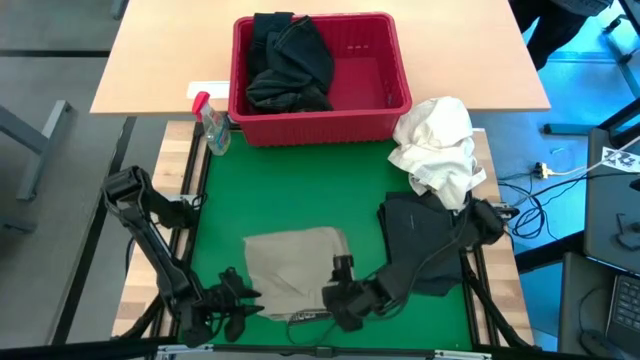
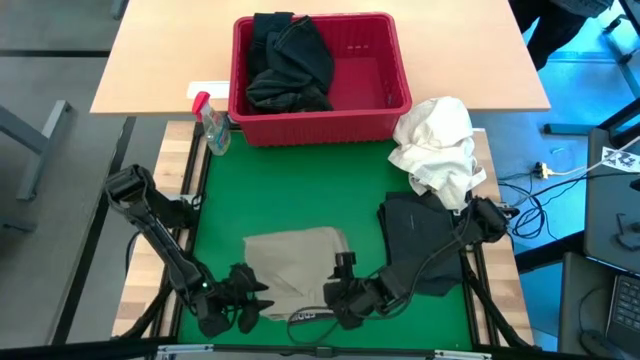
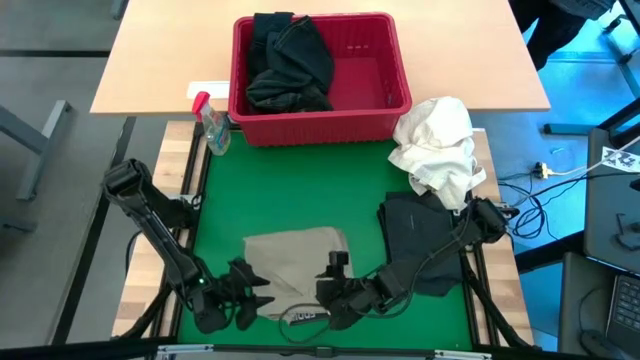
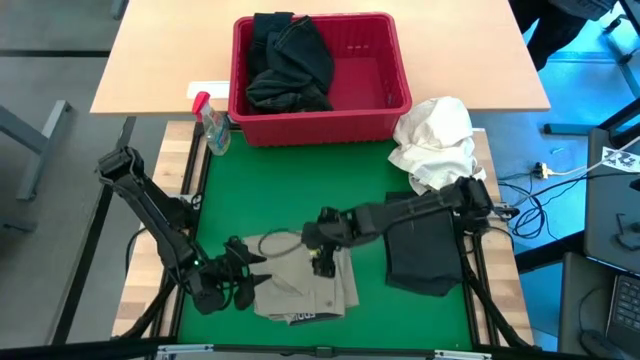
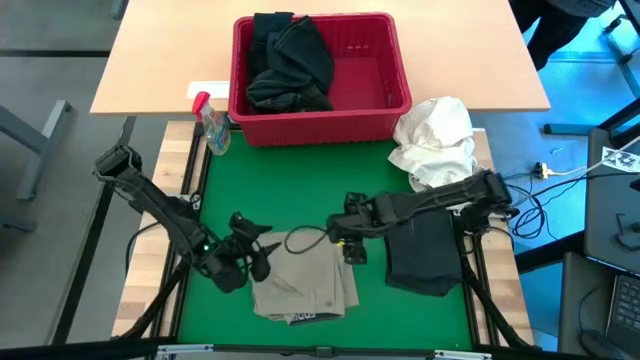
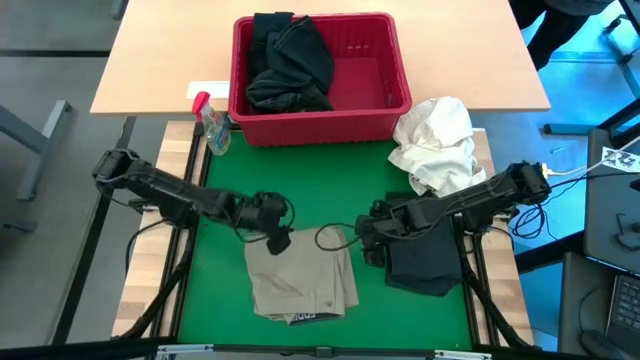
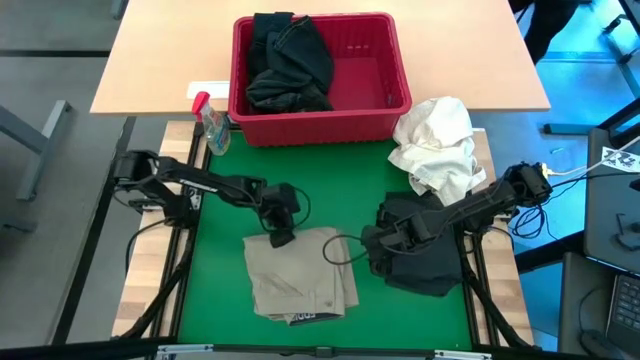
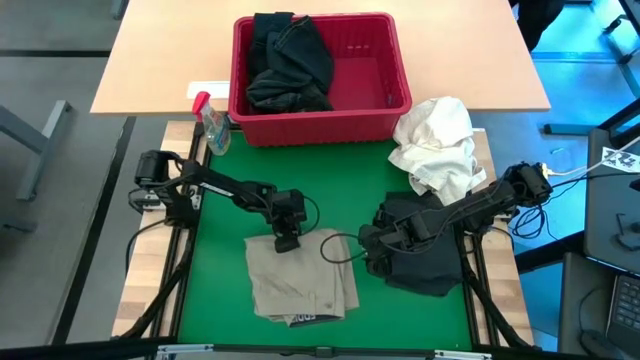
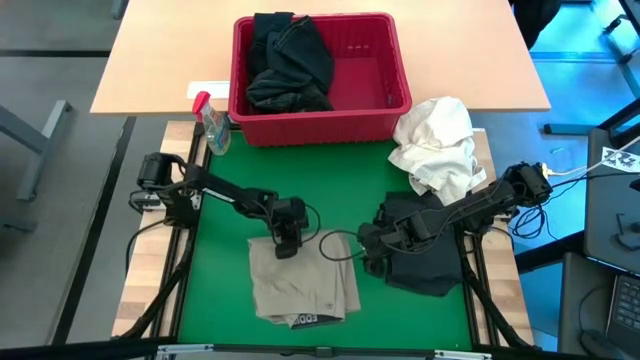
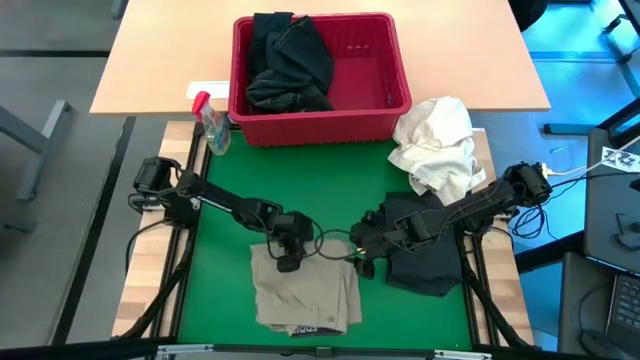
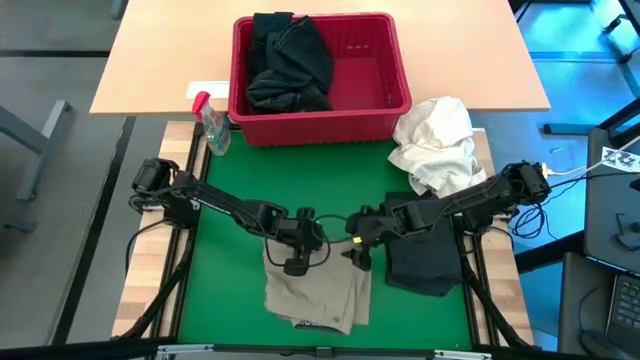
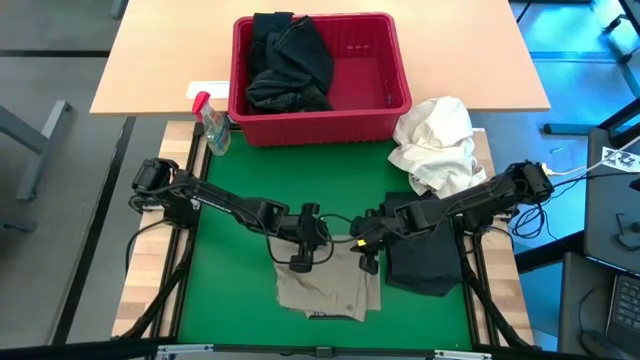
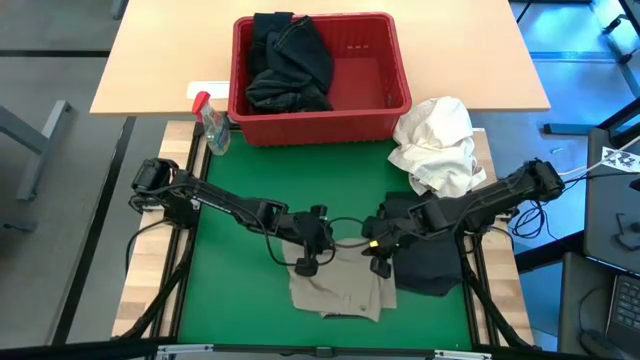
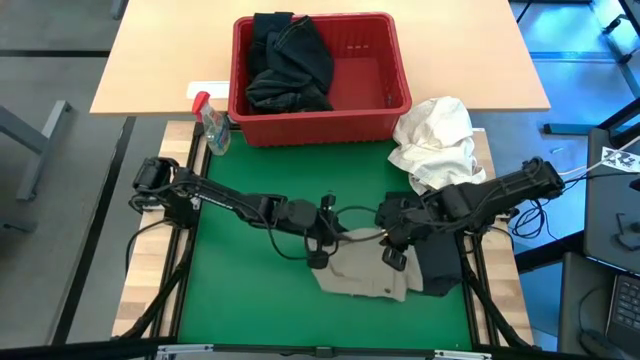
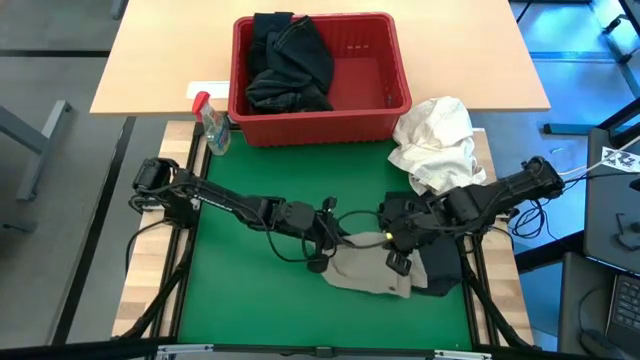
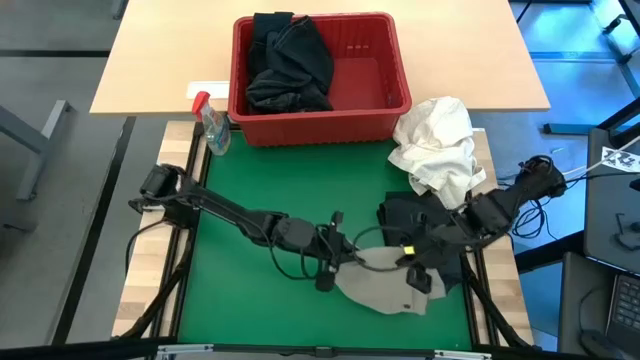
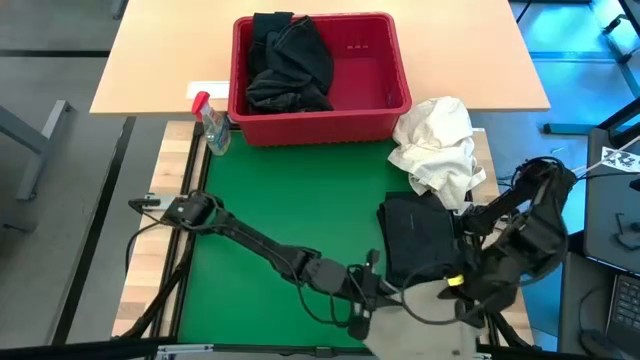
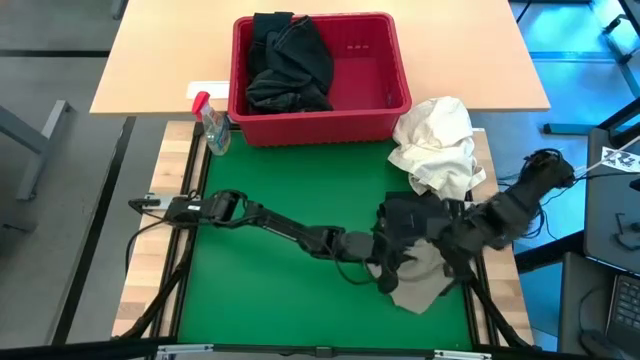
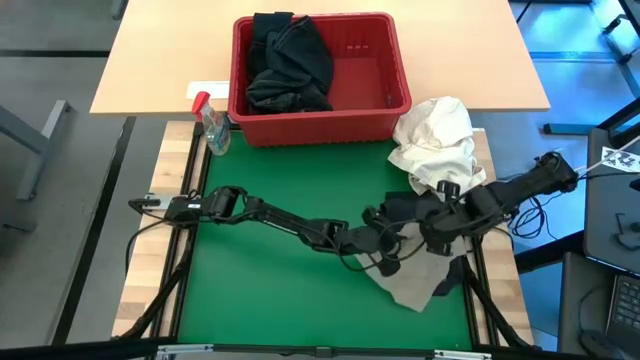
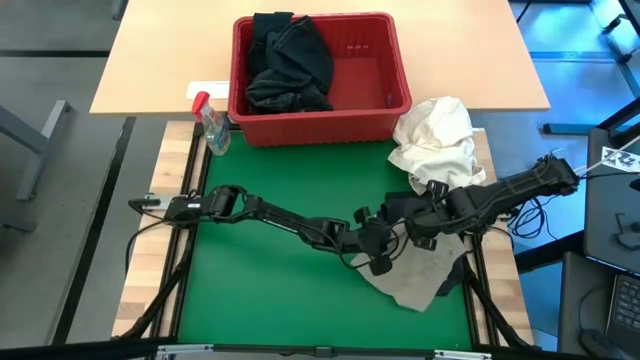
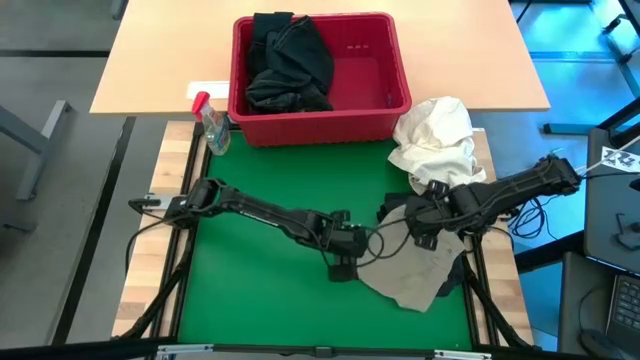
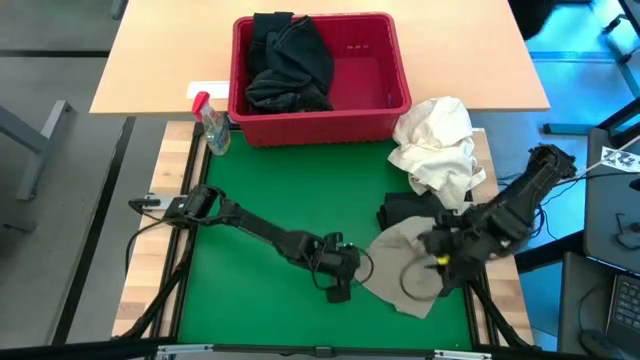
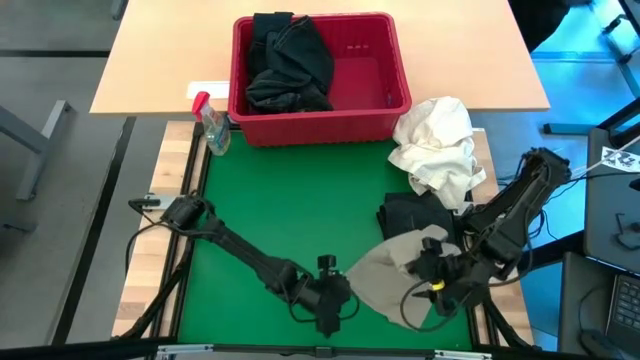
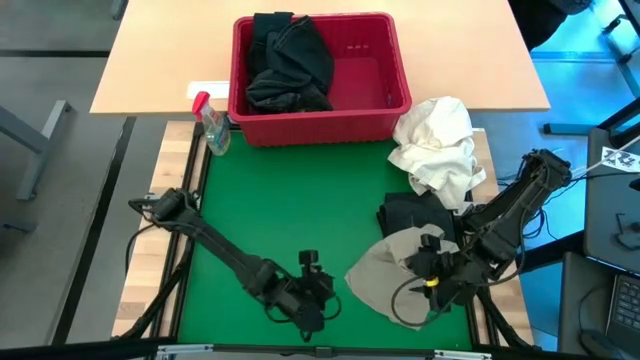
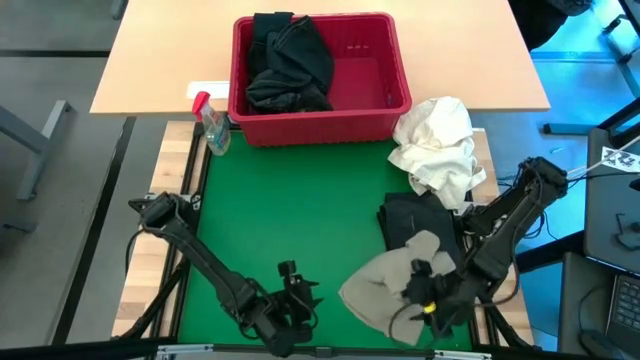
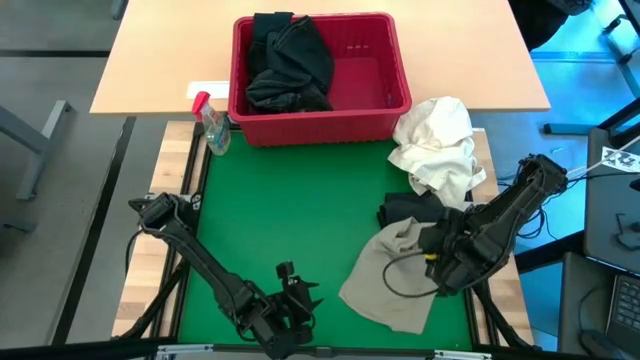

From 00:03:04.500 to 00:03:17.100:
Task: Fold Laundry from Bin
Stack the brown shorts on top of the black shorts

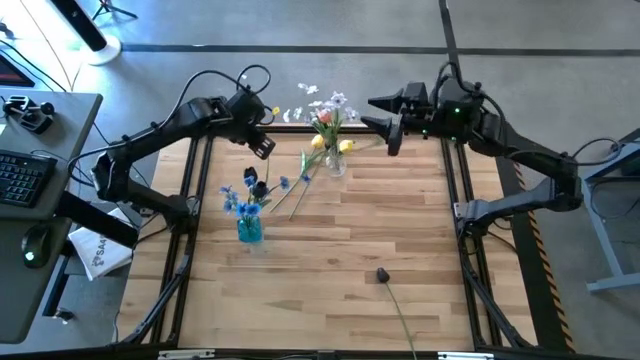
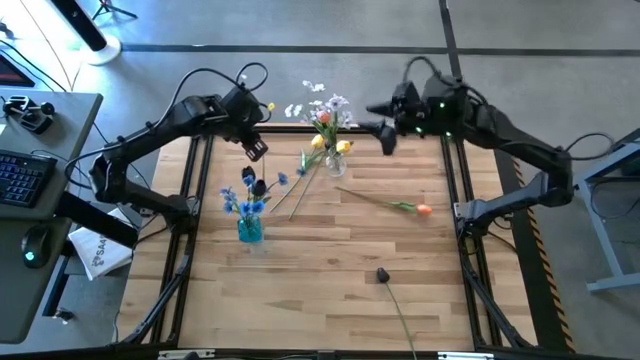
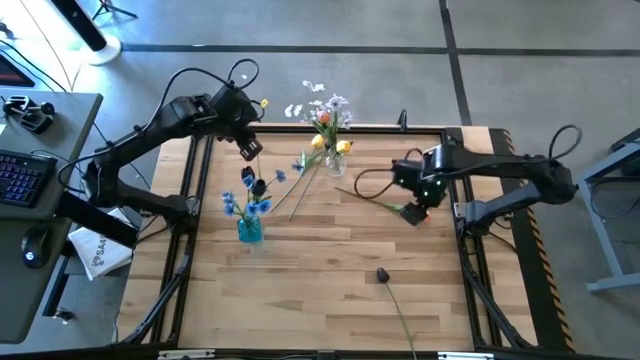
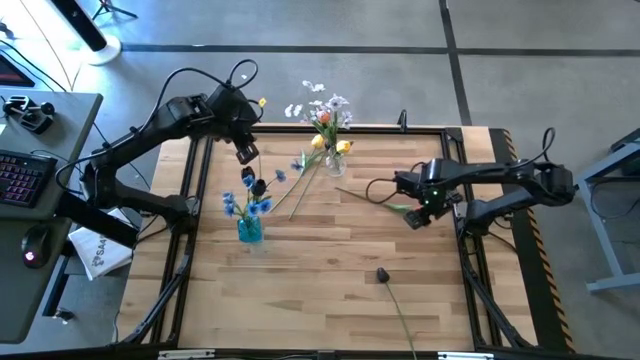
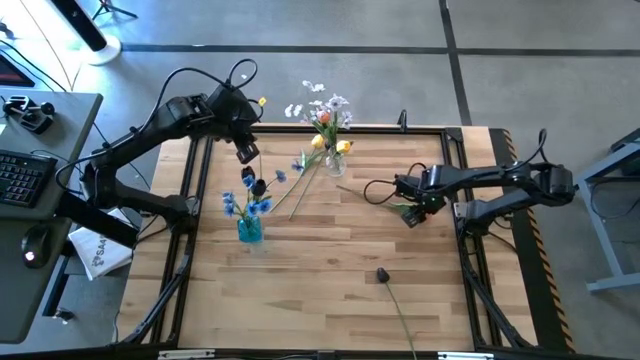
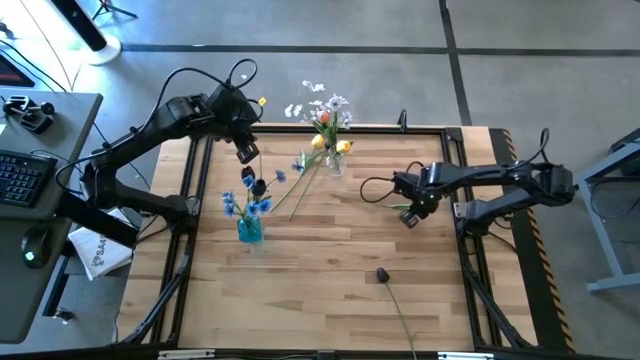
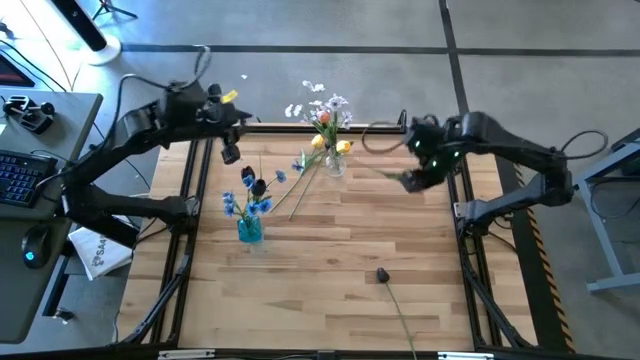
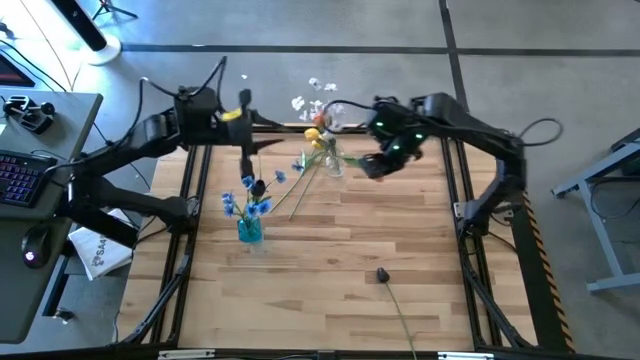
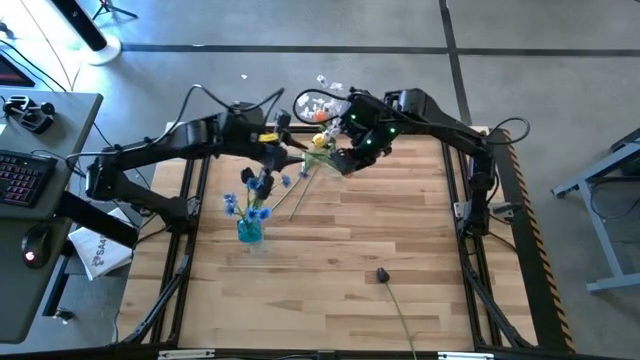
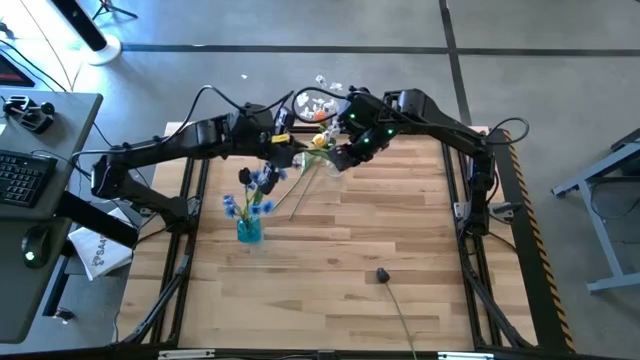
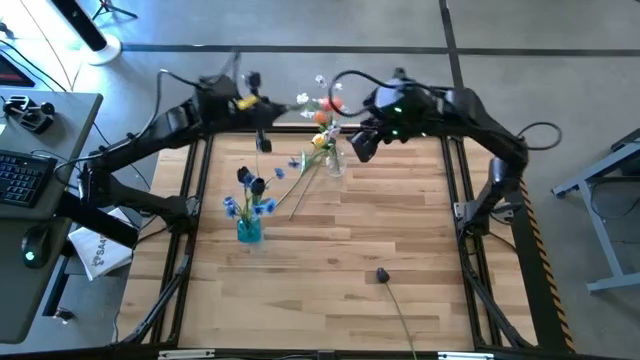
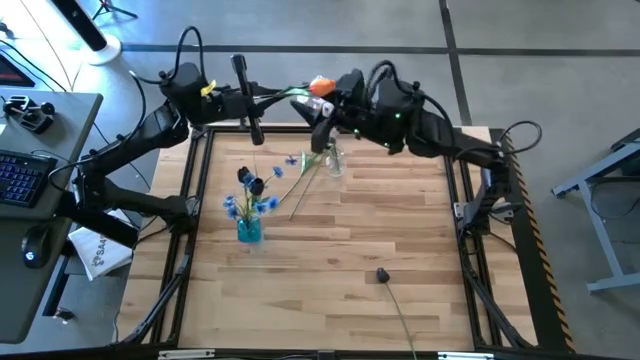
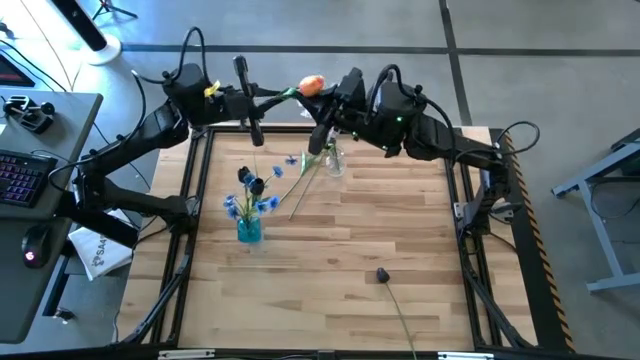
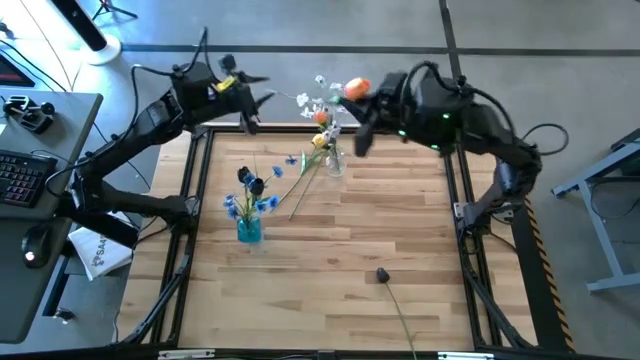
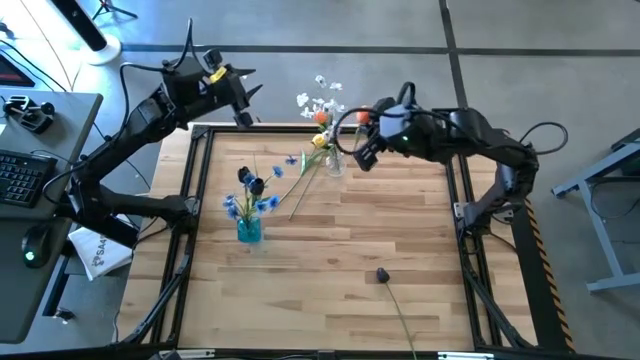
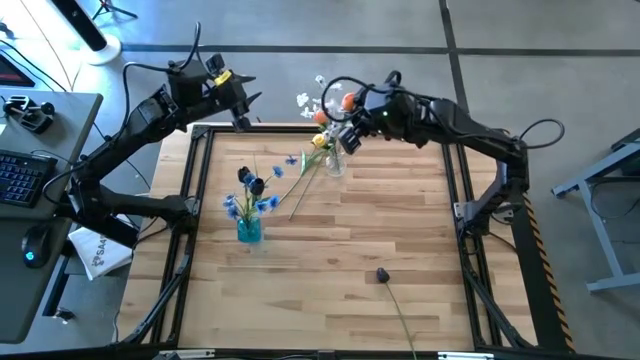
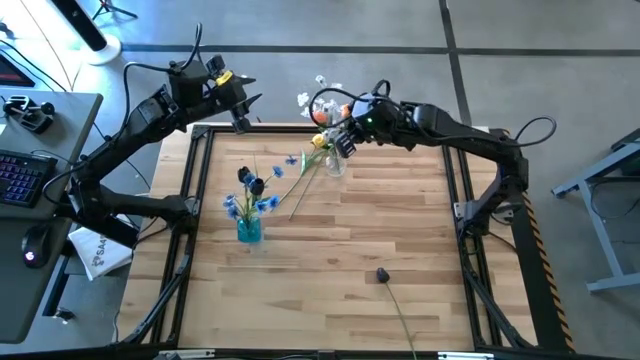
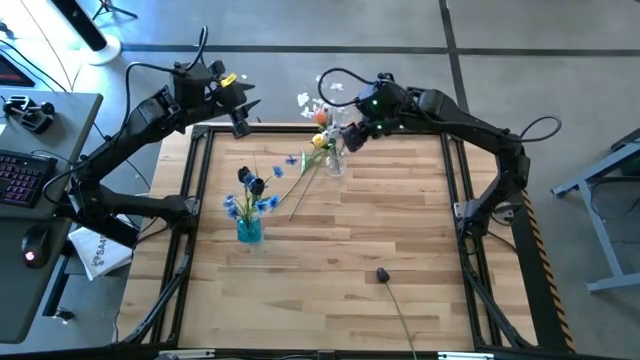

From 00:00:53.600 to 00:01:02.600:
Task: Sort flowers into vase by color
Put the orange flower into the transparent vase
